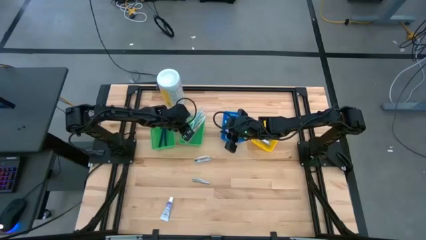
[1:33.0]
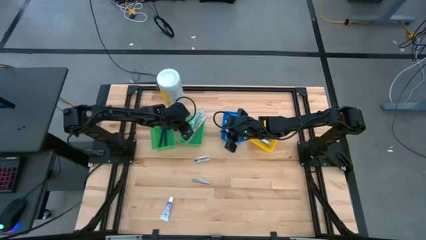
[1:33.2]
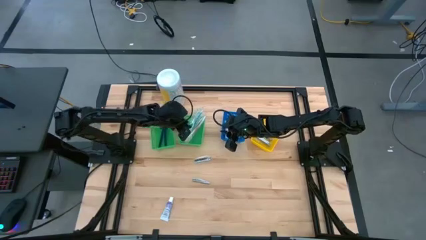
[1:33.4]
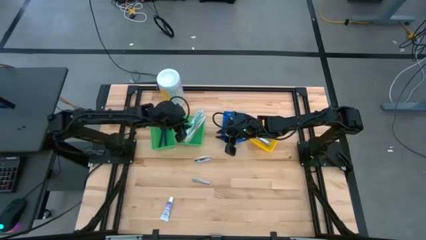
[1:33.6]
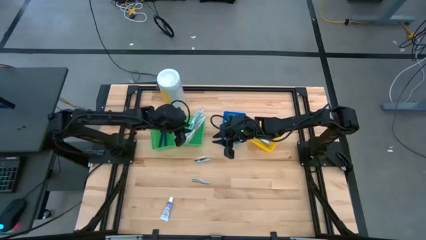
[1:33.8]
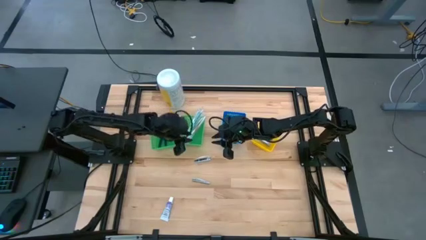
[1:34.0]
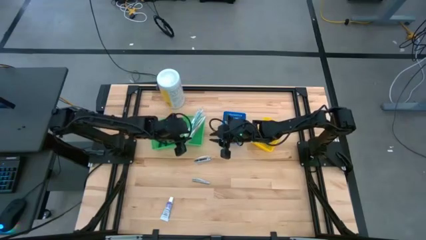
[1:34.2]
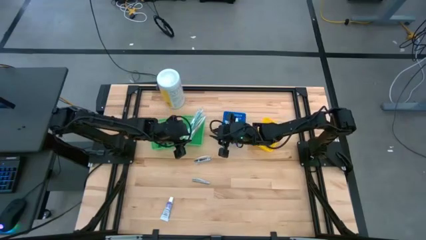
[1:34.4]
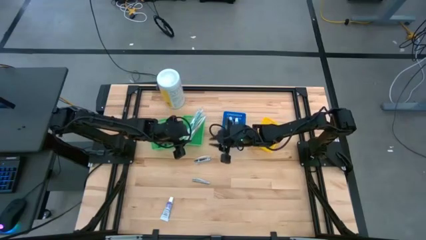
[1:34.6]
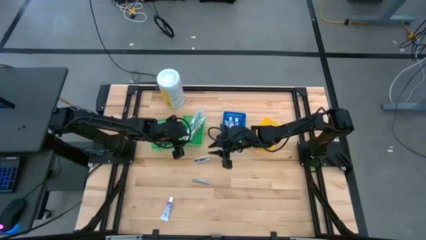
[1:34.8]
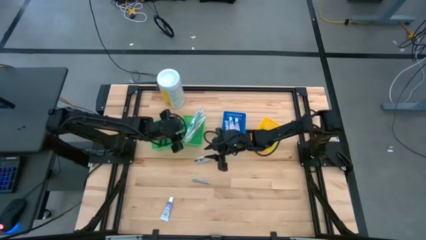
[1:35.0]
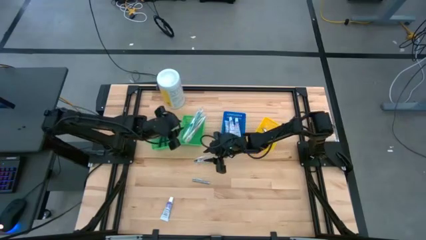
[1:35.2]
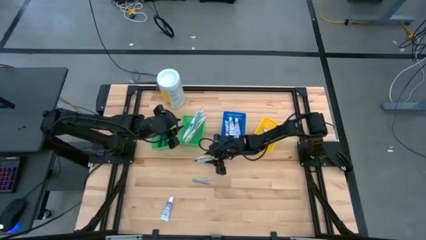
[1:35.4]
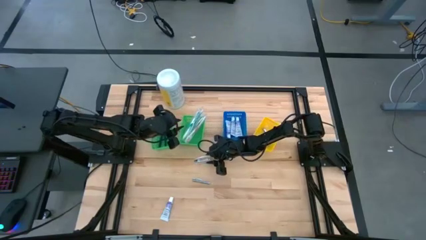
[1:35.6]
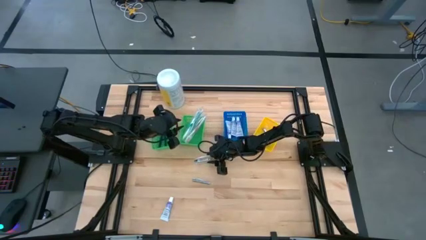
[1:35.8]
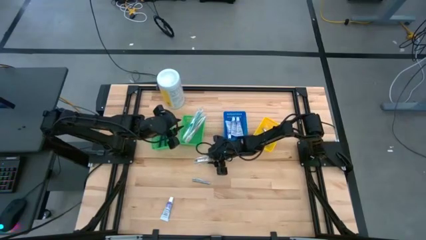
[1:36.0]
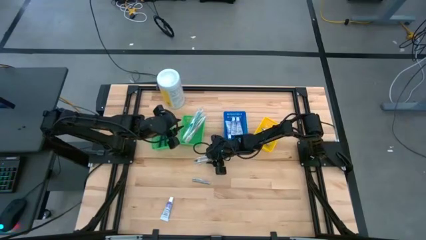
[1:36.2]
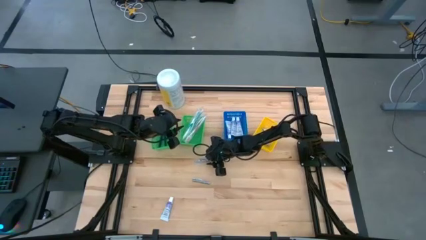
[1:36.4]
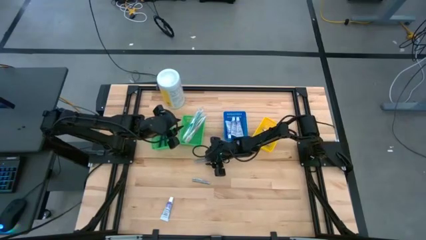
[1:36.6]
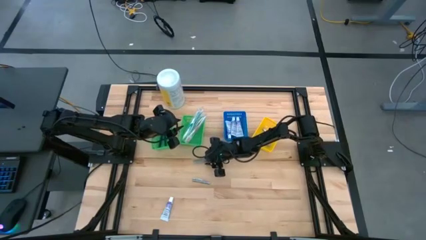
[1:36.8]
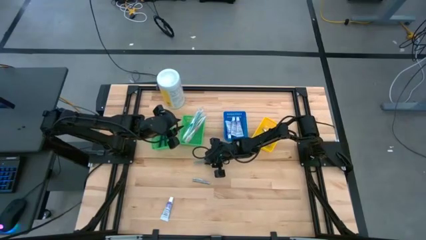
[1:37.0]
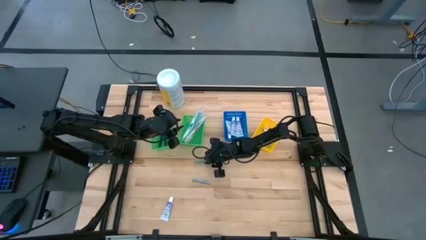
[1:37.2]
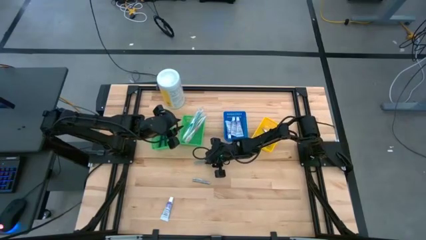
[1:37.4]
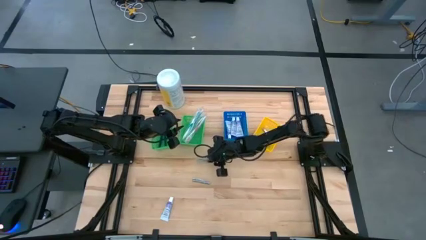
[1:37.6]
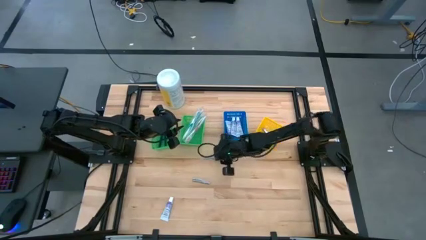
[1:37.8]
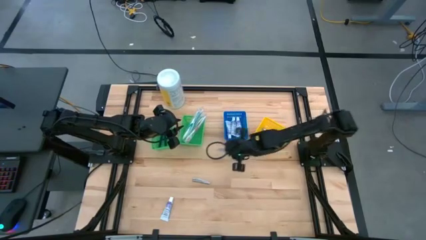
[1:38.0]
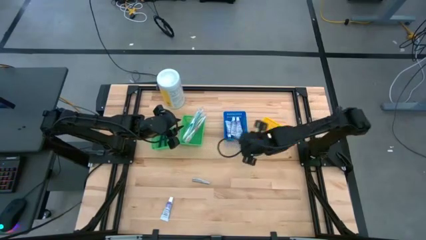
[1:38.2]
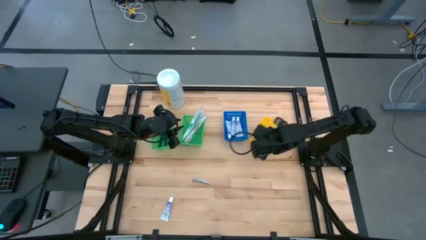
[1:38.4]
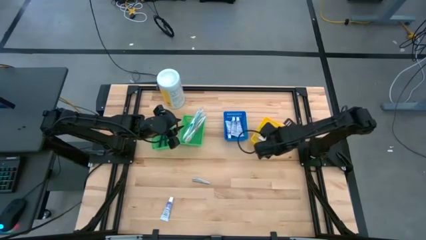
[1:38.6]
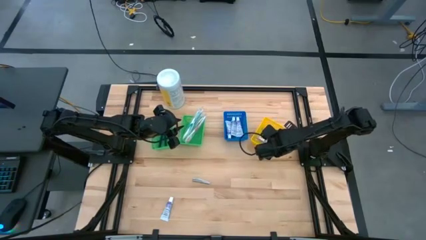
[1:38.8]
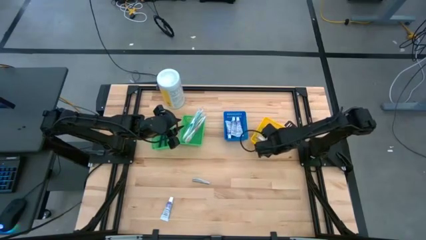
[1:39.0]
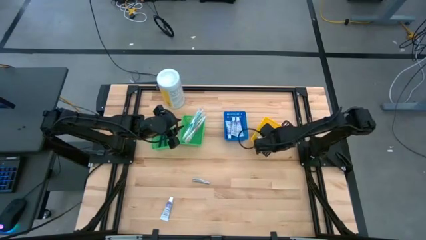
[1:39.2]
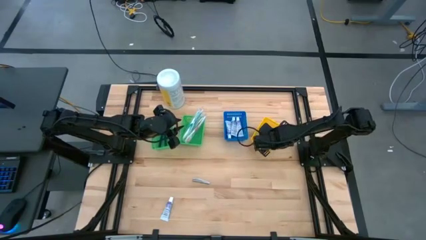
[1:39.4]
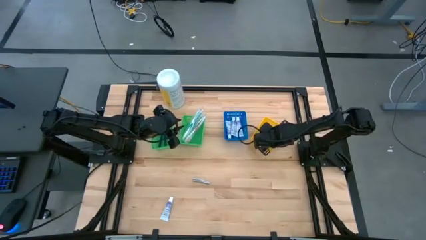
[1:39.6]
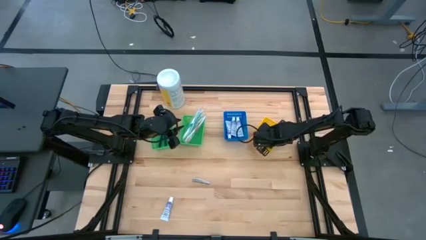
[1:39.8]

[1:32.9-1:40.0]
Task: Pick & Place Travel size toiletries
Put the silver nail cutter into the yellow bin

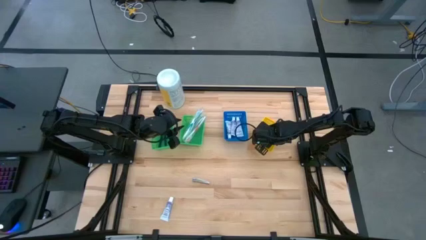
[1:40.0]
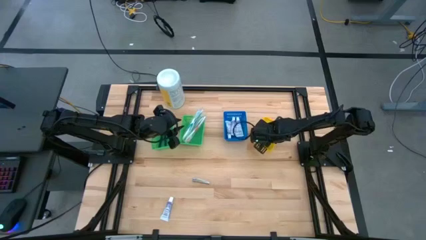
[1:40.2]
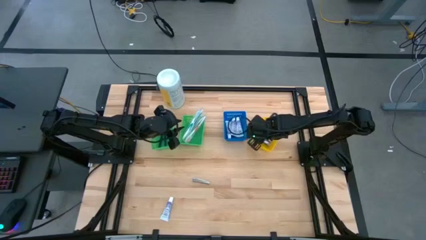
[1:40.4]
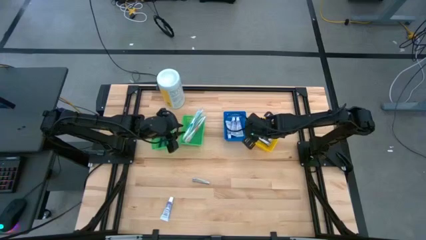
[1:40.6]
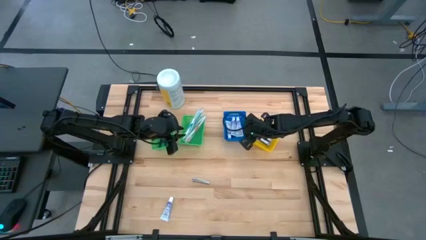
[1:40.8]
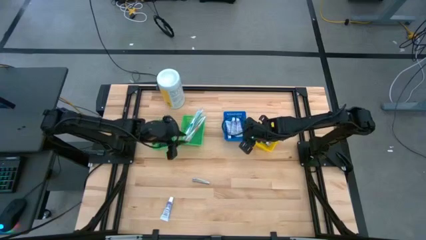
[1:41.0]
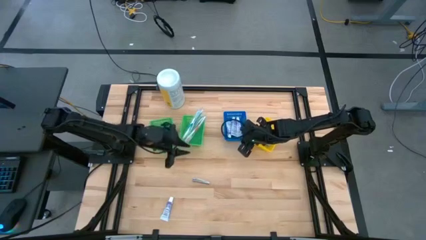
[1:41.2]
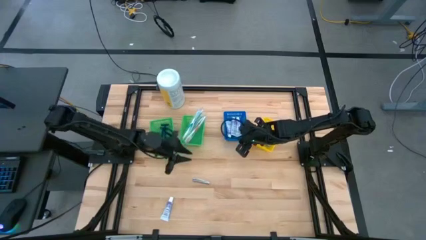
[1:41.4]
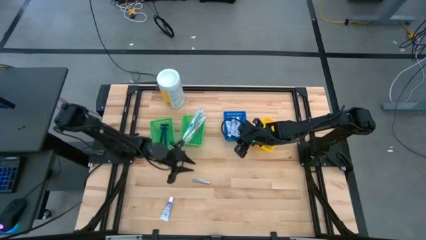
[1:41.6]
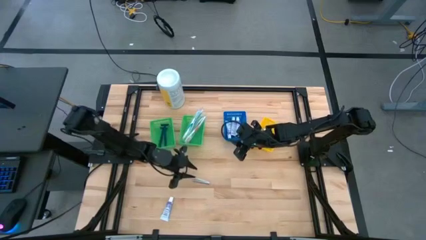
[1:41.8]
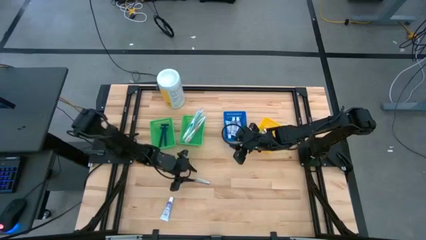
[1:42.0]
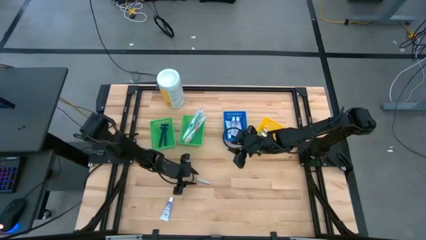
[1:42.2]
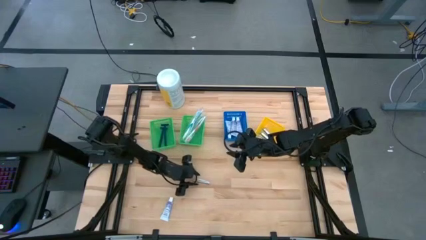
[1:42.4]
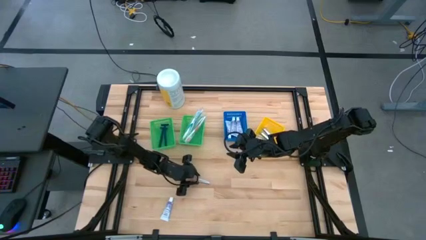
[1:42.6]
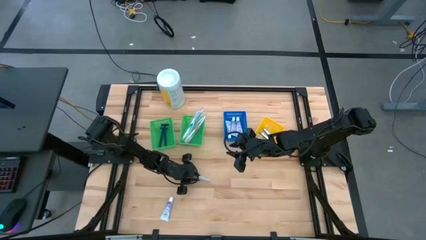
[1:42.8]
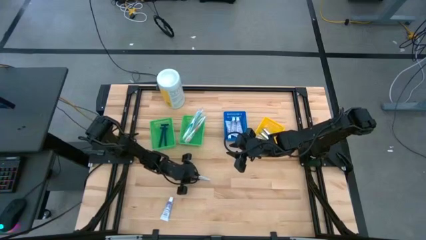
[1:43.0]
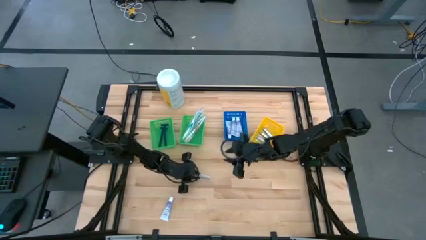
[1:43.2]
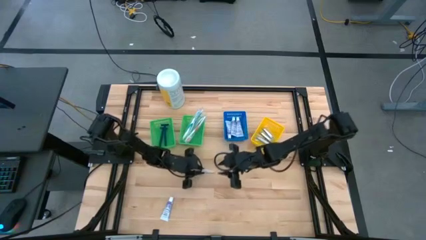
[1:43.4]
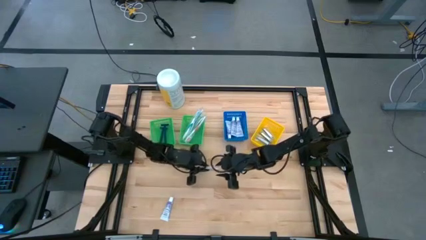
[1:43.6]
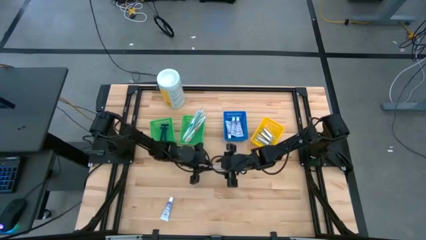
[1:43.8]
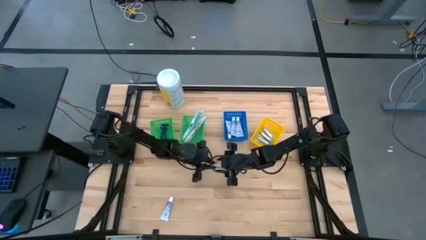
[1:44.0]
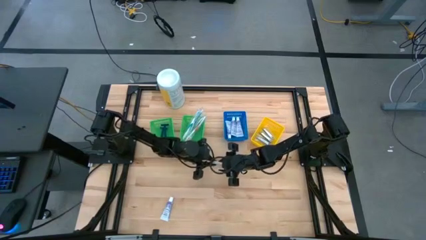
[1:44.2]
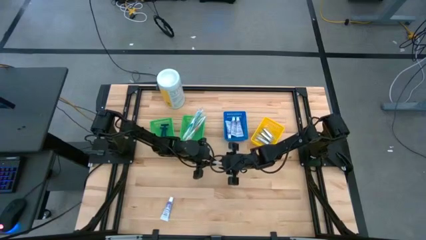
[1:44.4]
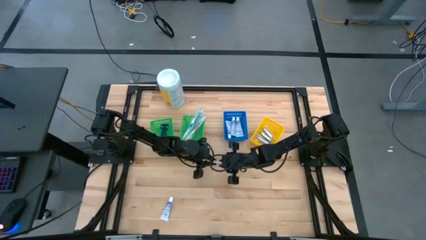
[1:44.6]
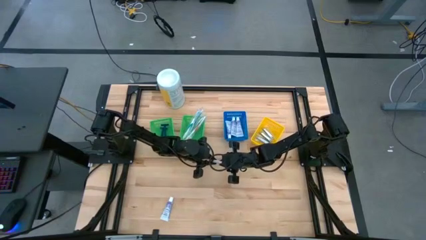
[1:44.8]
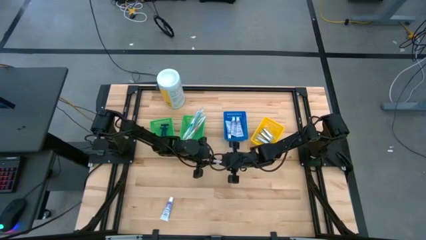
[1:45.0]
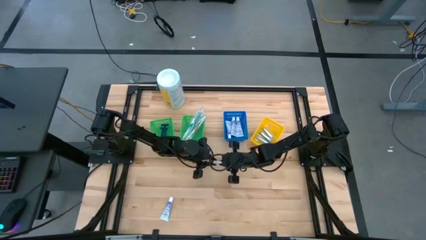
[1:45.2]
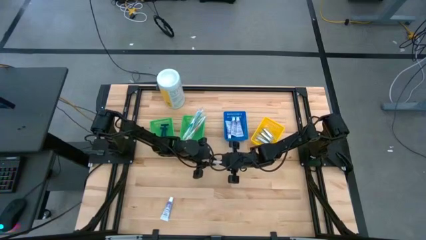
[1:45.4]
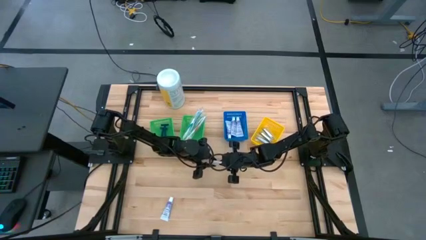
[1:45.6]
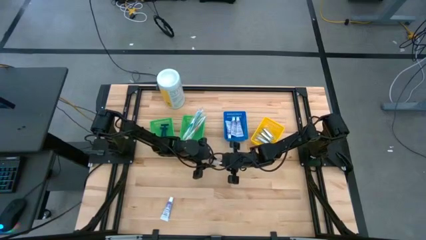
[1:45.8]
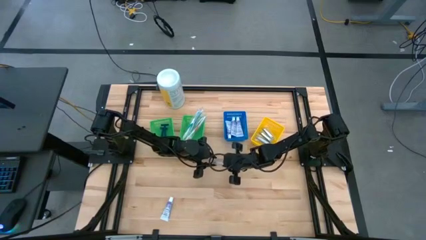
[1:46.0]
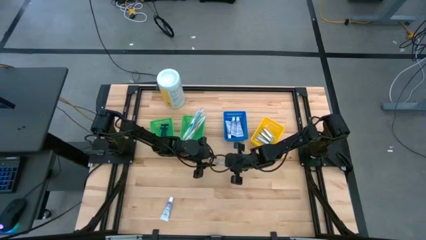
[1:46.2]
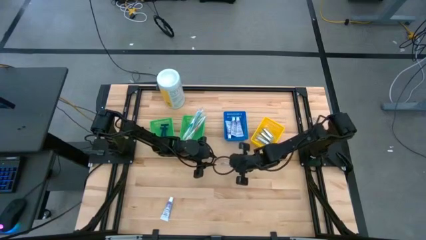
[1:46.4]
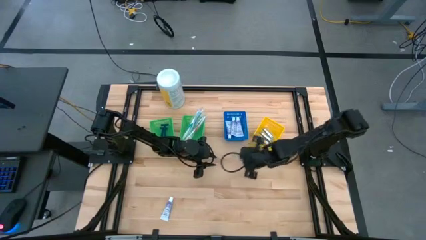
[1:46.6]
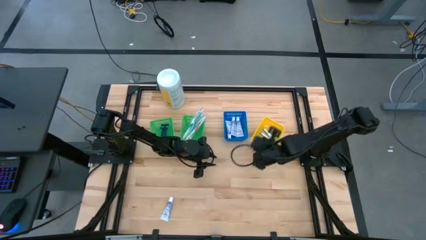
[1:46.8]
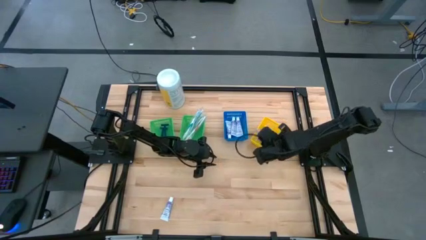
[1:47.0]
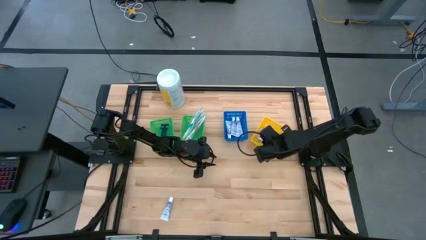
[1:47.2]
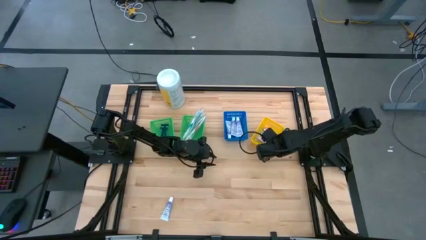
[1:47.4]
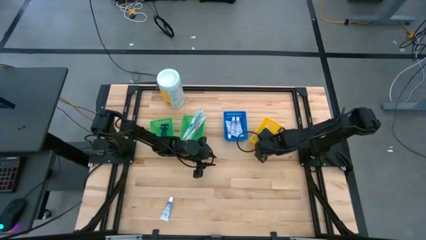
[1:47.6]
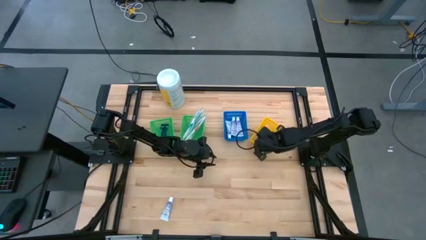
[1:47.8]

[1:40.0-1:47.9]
Put the silver nail cutter into the yellow bin
